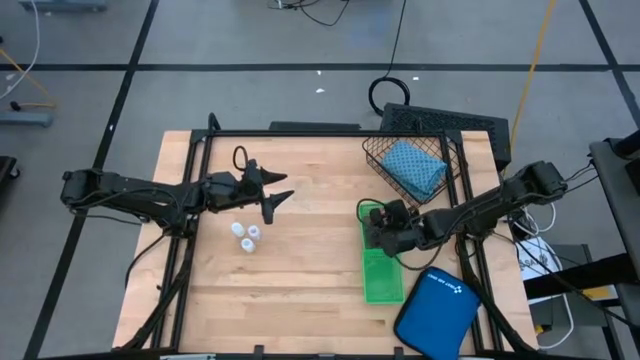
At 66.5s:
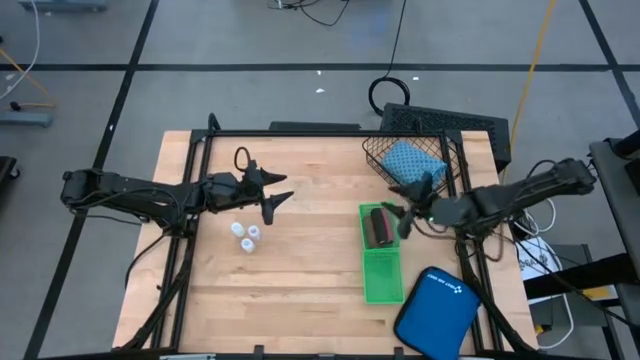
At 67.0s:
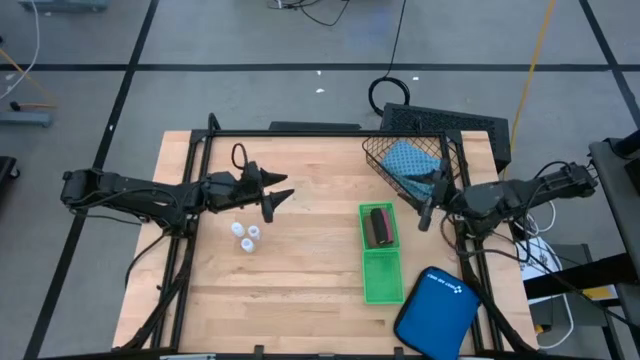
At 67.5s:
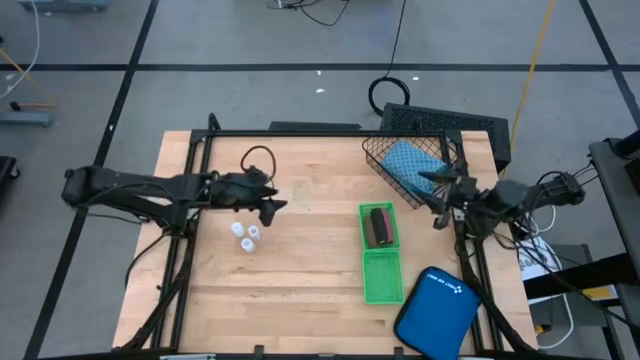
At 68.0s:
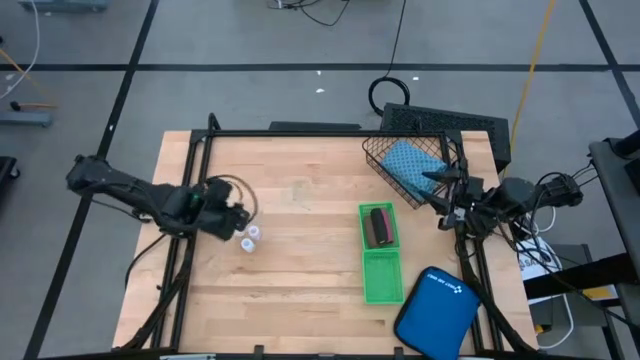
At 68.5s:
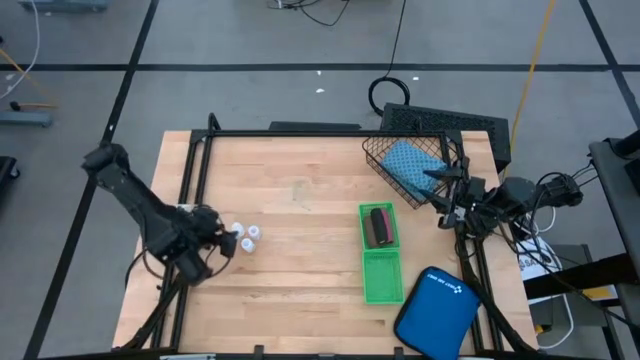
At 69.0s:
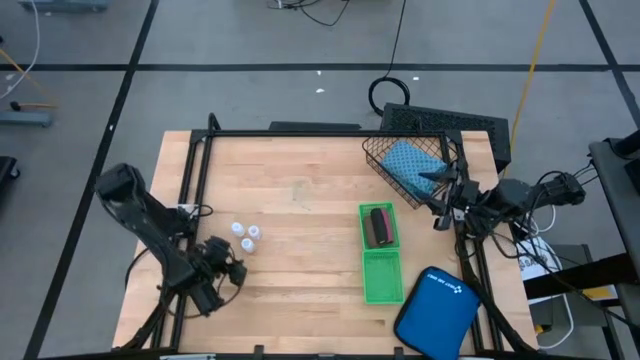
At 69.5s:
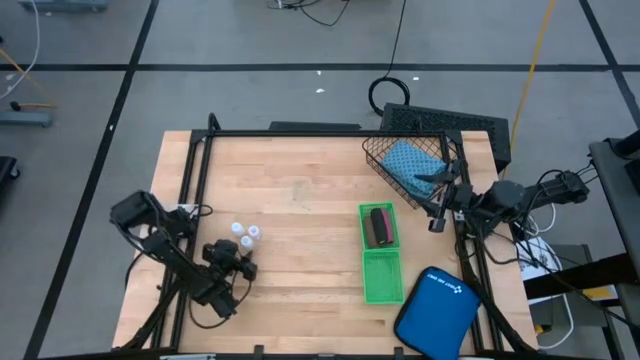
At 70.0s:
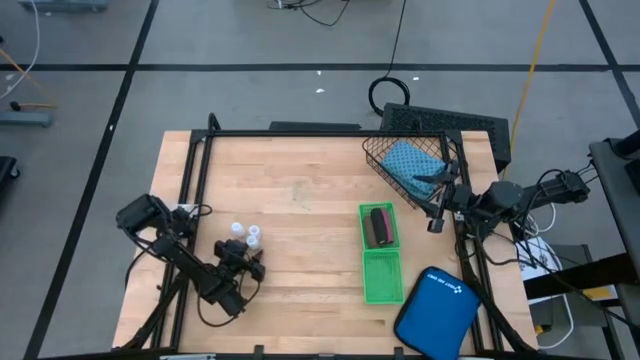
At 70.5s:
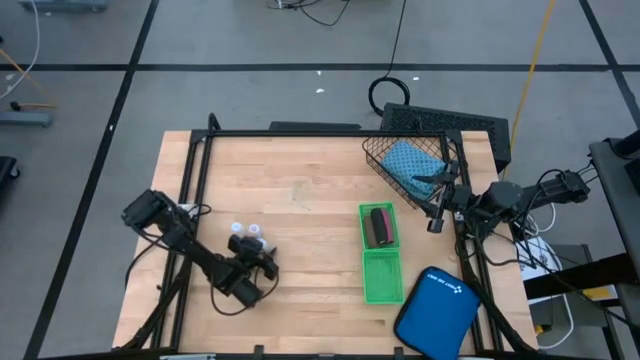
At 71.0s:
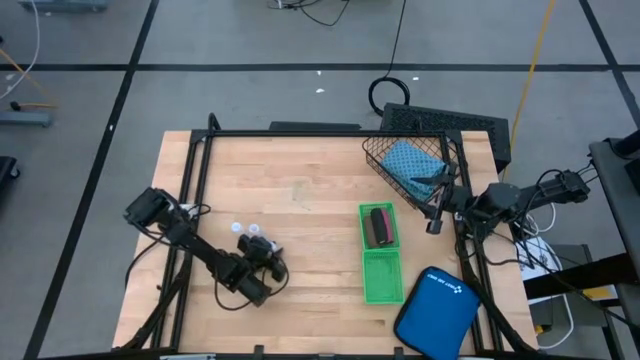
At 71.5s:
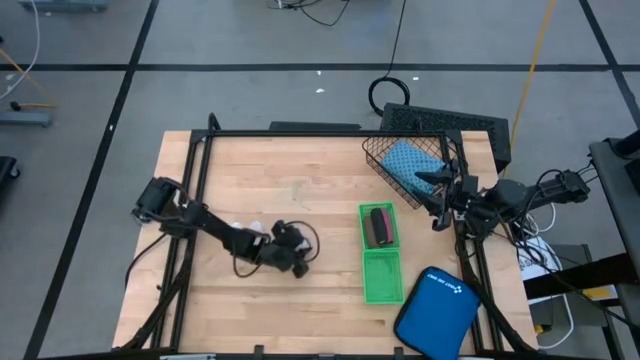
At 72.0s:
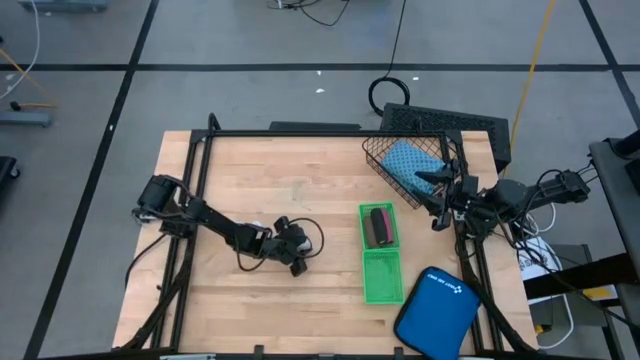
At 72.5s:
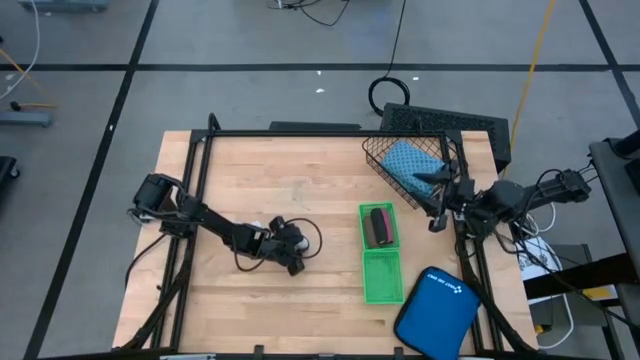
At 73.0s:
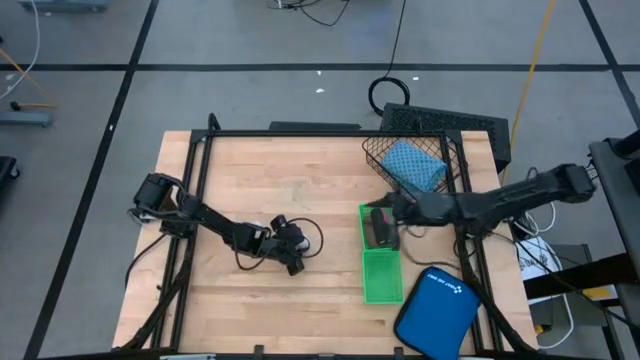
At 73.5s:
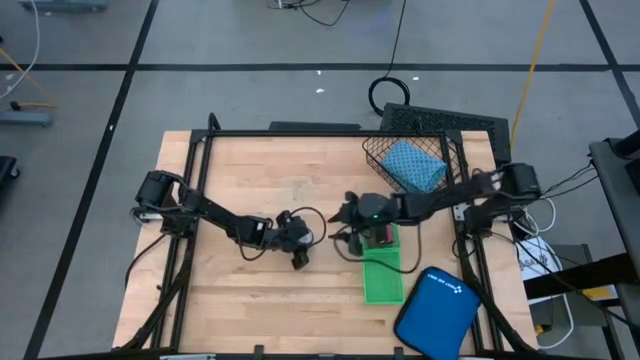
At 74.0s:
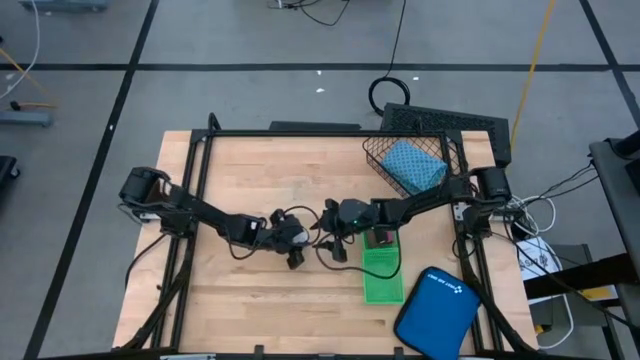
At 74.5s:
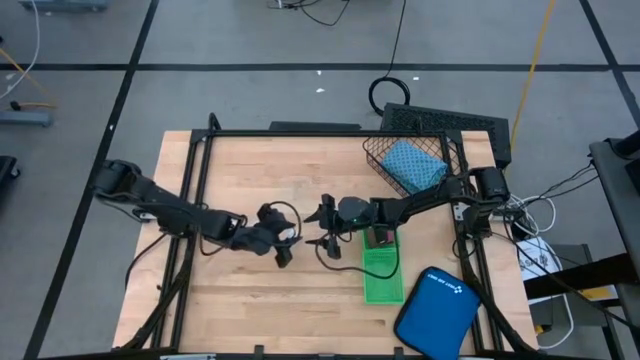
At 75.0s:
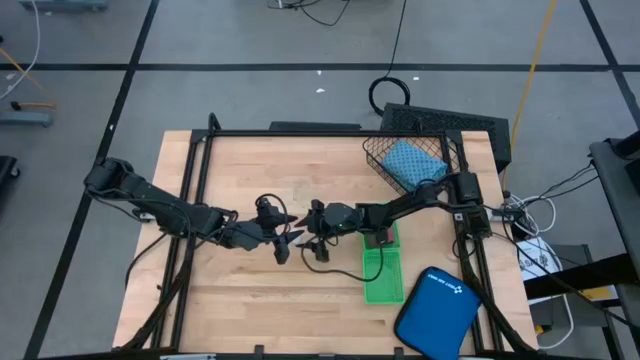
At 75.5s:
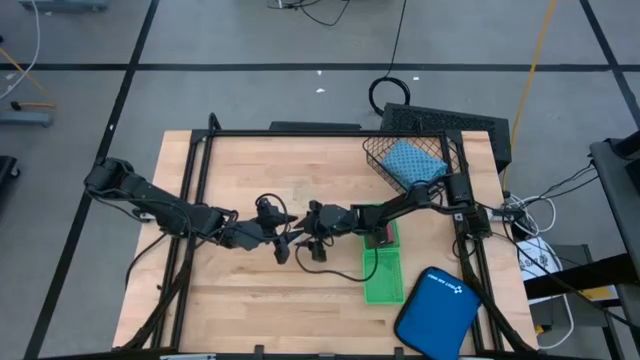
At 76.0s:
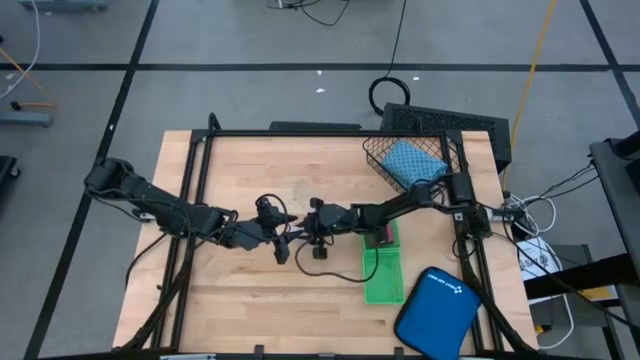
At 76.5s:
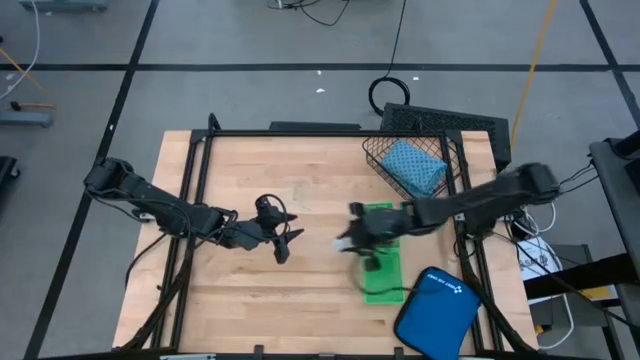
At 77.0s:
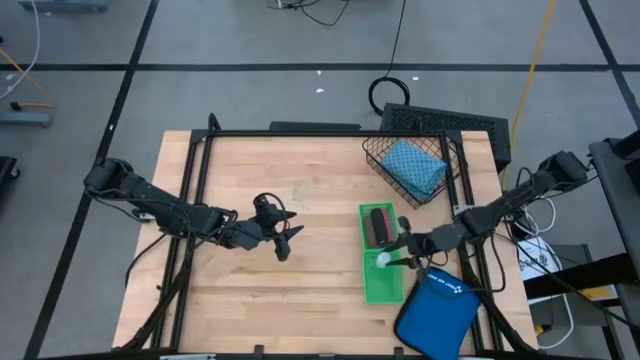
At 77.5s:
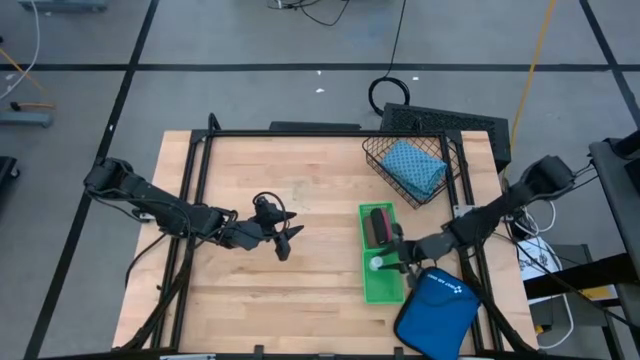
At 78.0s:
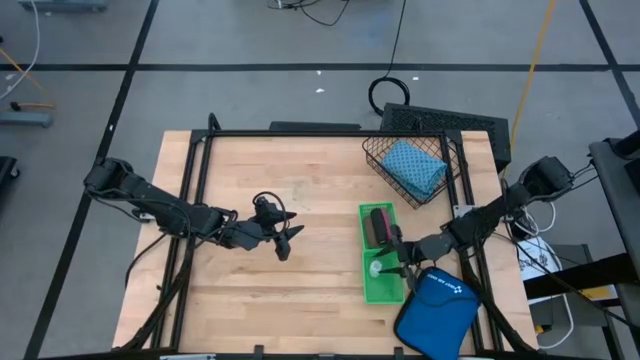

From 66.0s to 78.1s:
Task: Pick & Place Medicine items
Put the bottom transparent pill bottle into the bottom green basket

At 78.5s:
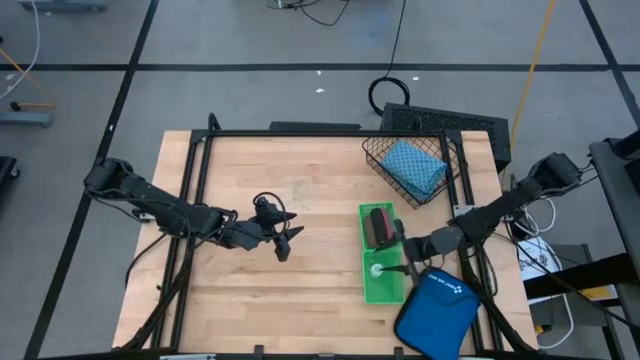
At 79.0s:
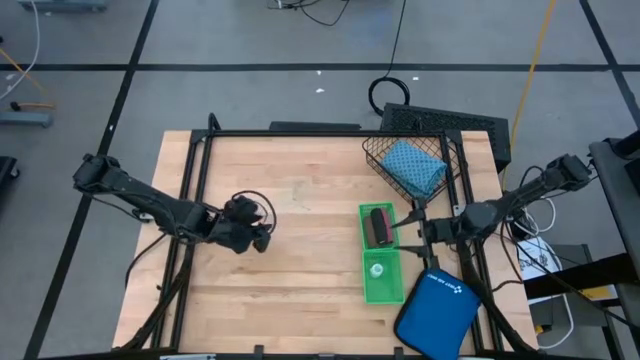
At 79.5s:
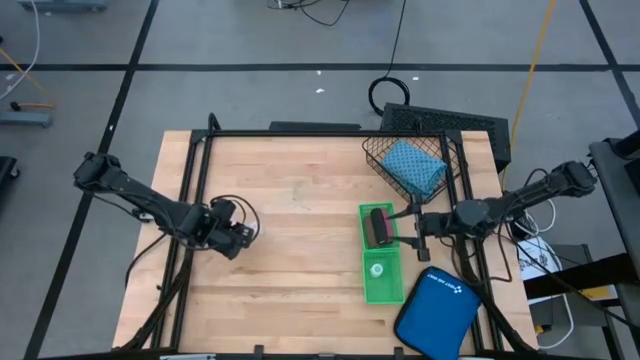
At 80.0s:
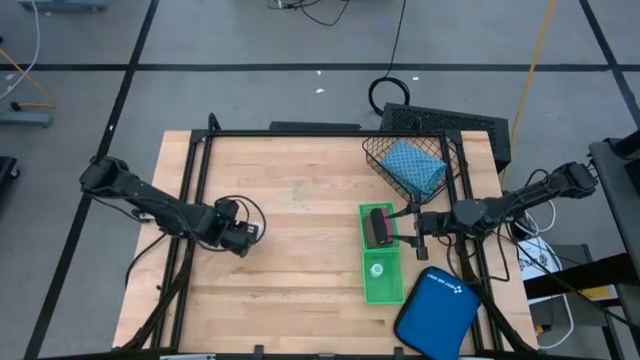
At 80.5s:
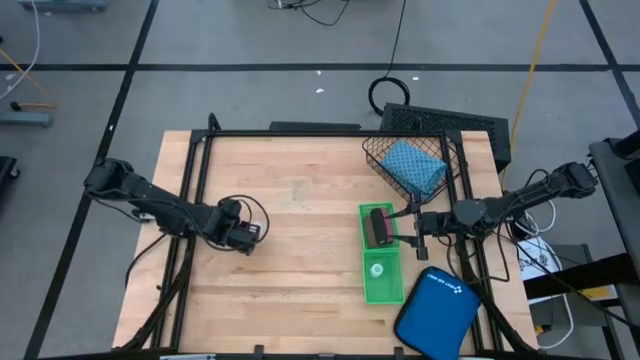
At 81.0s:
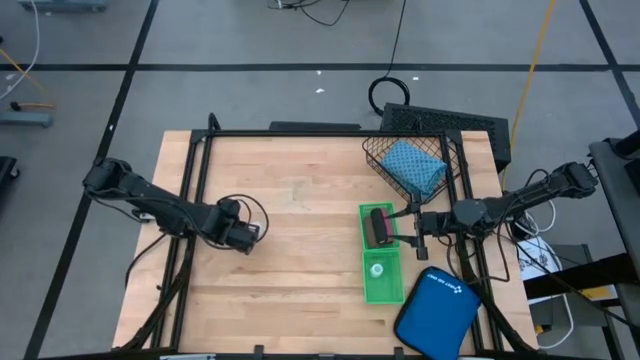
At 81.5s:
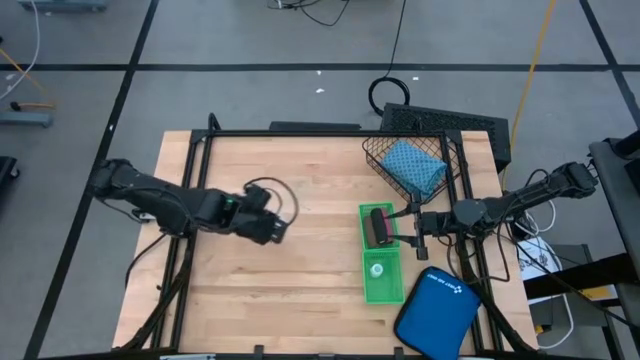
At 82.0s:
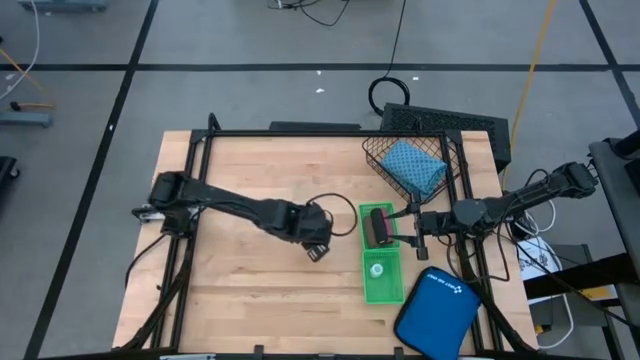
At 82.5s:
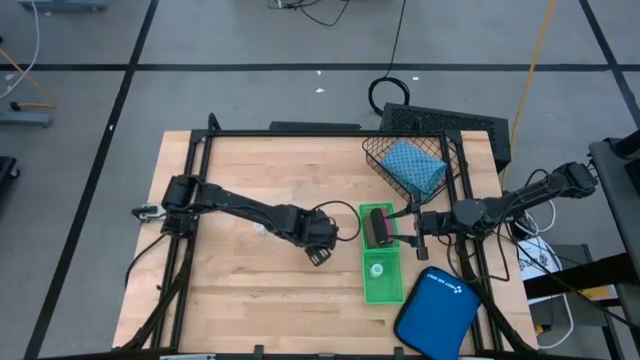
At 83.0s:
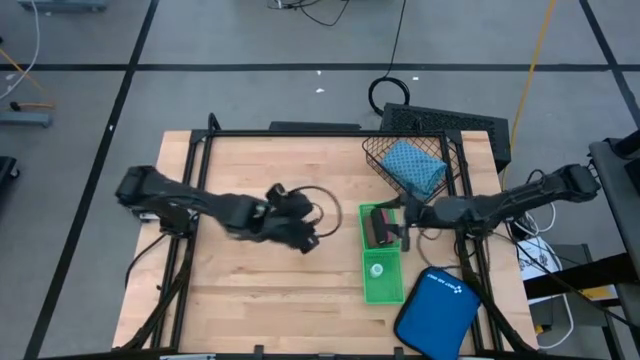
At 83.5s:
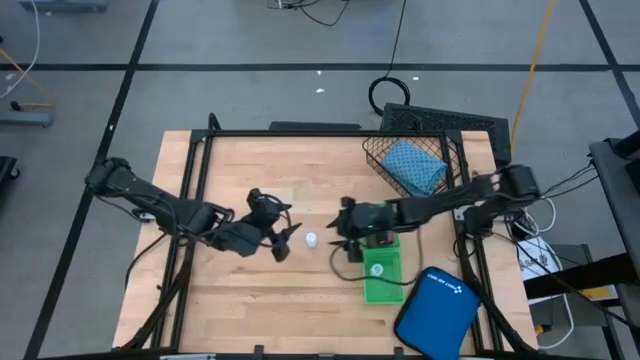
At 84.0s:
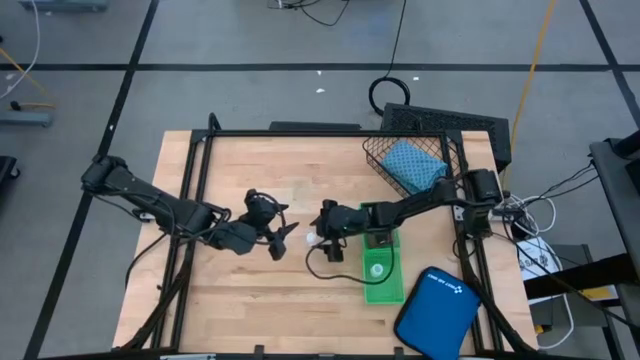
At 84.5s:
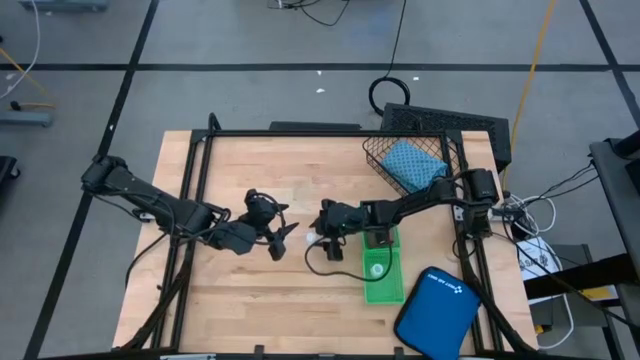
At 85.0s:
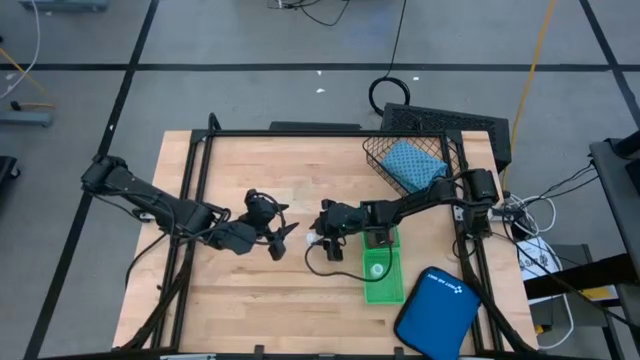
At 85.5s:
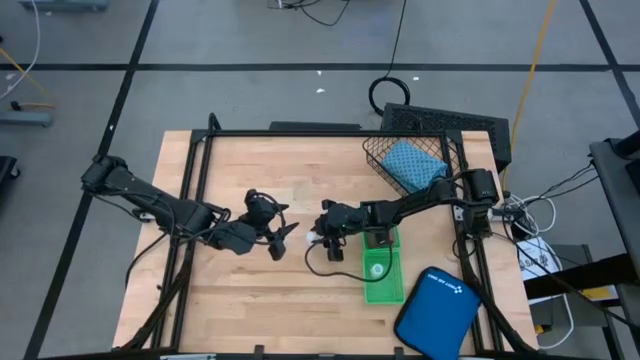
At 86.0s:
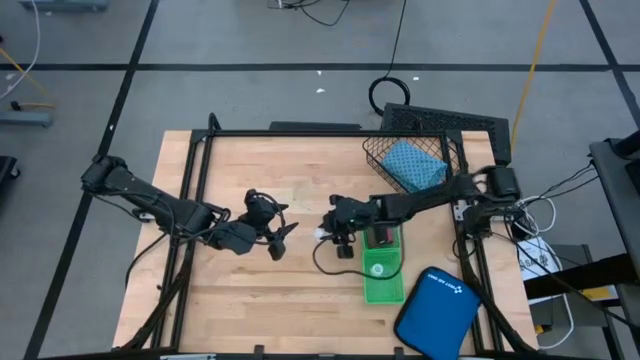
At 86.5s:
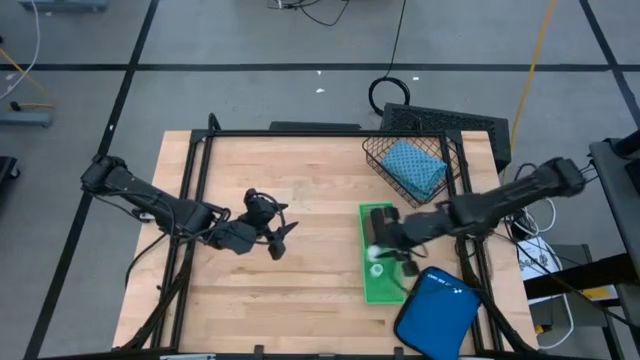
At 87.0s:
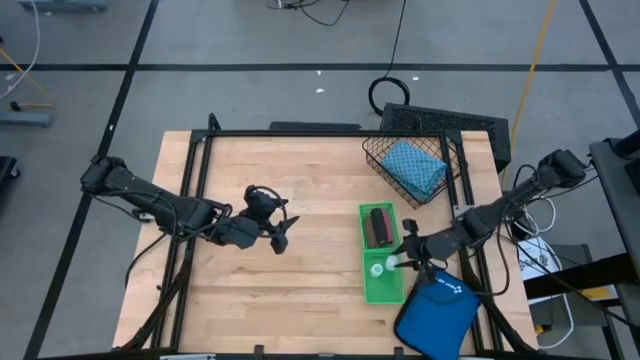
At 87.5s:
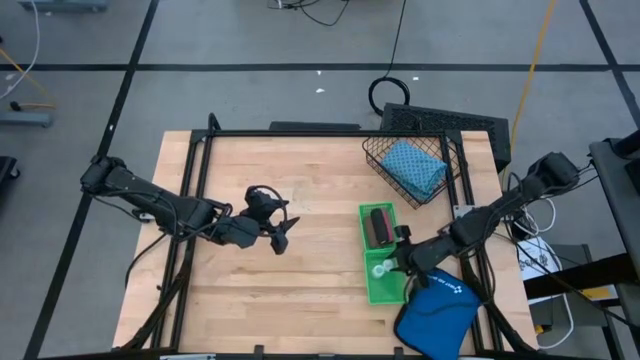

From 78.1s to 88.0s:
Put the left transparent pill bottle into the bottom green basket

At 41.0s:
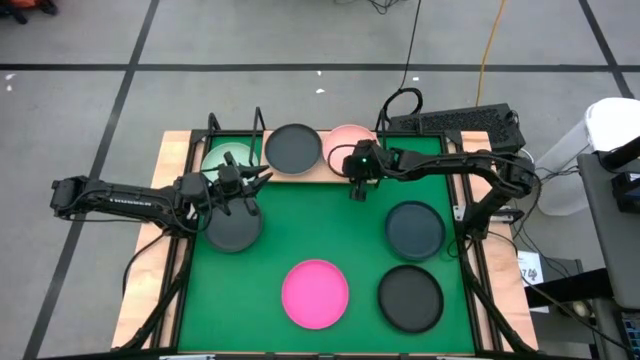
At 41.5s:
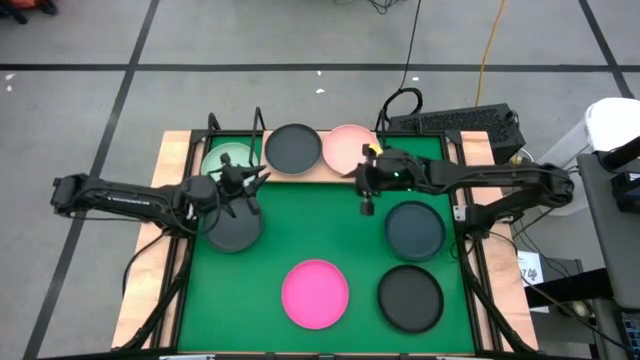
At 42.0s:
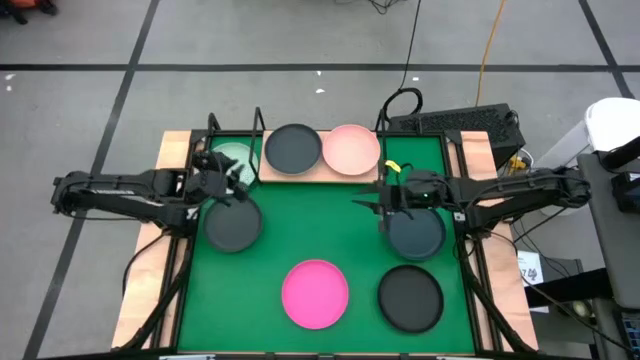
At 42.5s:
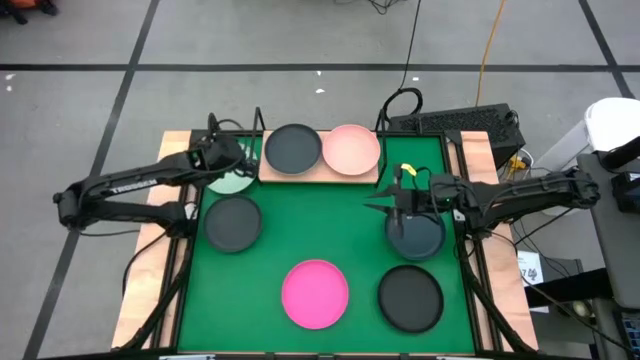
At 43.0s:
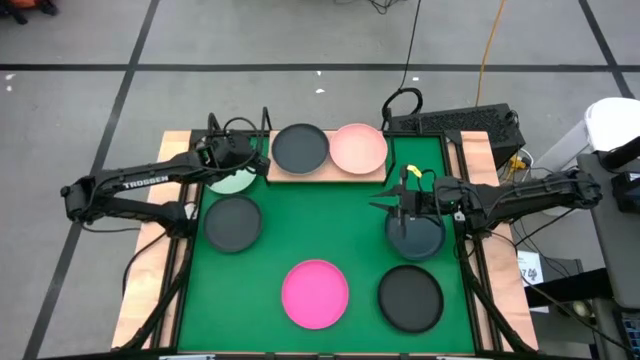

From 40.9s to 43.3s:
Task: Place and stack plates onto a shelf
Adjust the shelf
